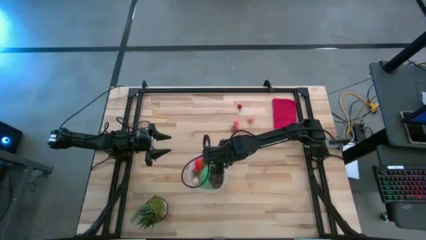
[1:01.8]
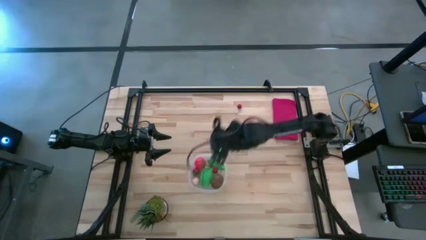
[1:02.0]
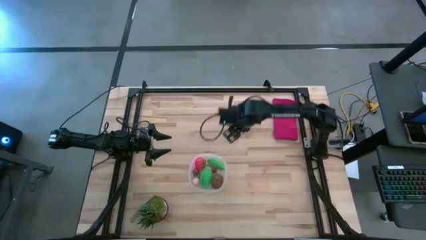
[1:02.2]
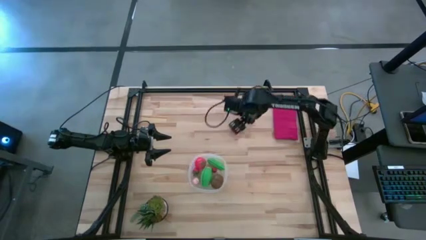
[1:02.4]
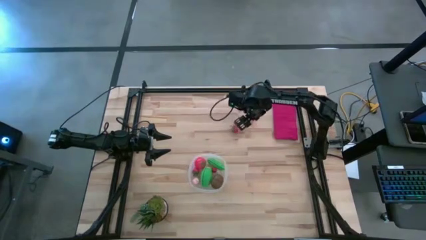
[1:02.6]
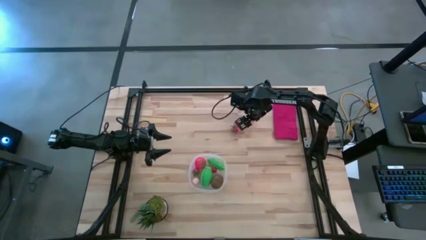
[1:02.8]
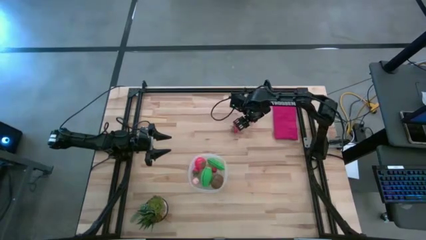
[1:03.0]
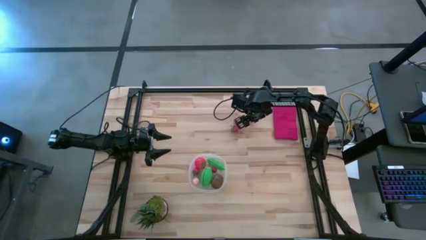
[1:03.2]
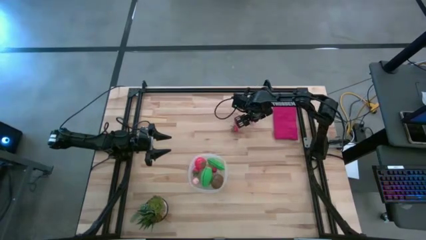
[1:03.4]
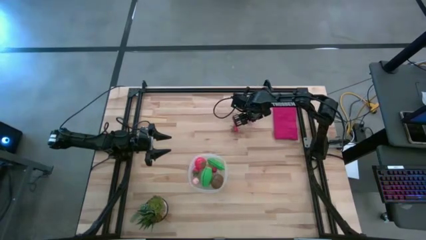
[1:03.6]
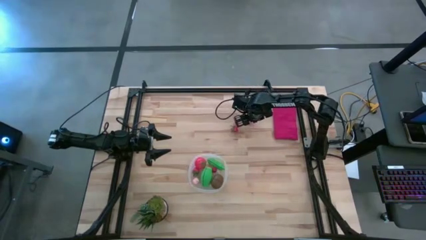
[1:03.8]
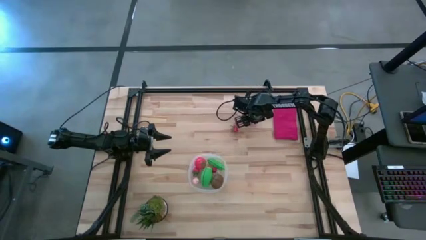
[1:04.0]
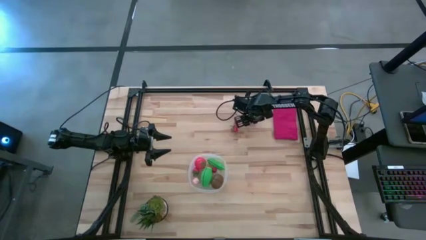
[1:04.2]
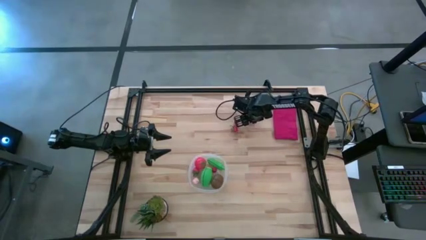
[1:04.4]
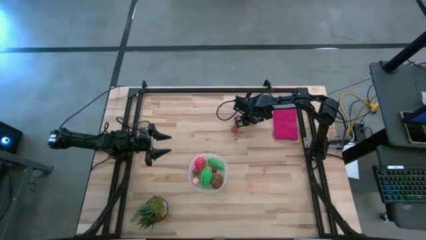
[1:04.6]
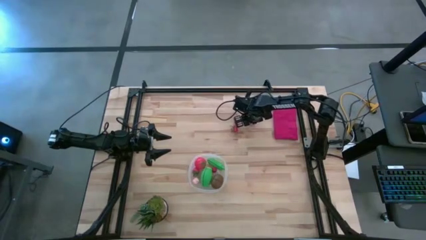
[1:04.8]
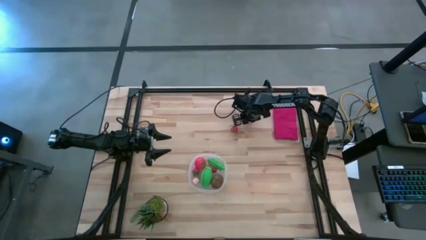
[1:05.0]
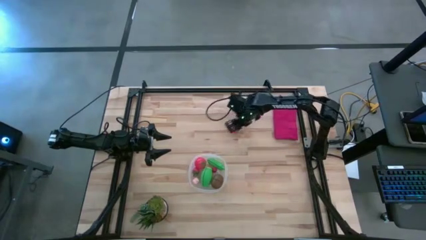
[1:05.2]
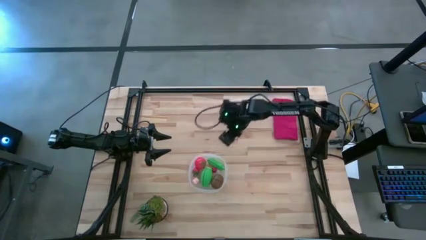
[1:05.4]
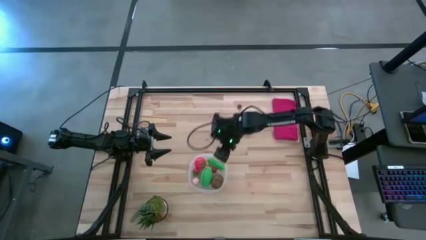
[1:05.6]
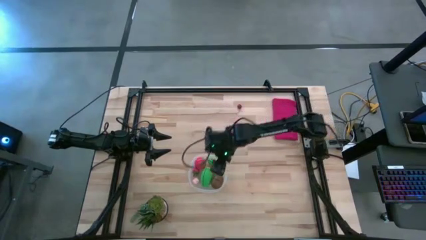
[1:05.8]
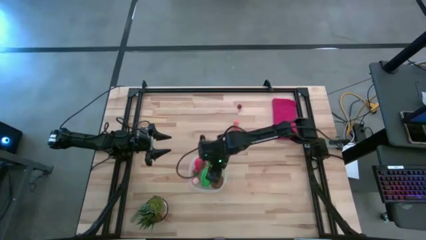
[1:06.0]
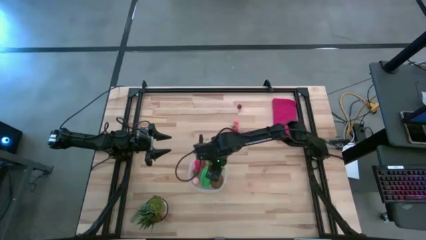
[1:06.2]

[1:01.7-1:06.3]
Task: Pick and placing Produce into tupperware
Put the peach into the bin

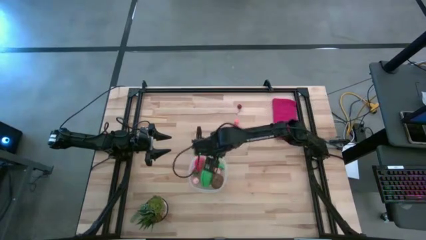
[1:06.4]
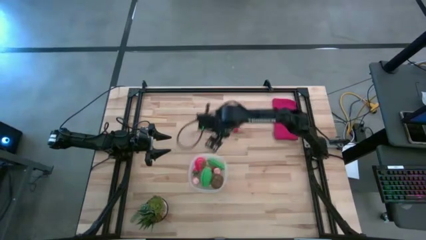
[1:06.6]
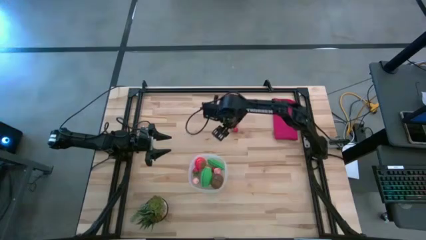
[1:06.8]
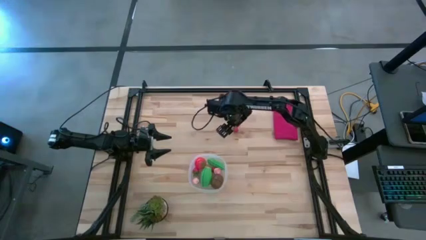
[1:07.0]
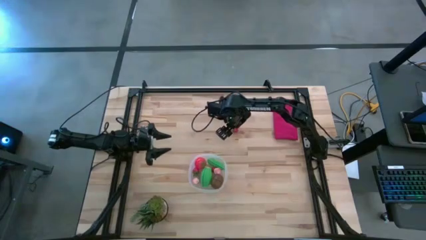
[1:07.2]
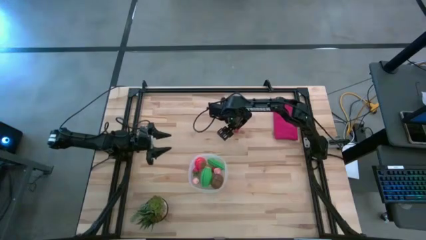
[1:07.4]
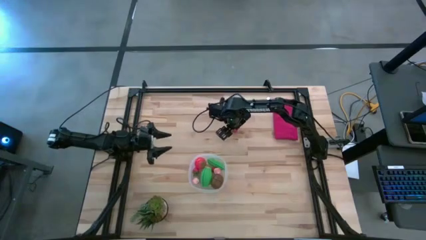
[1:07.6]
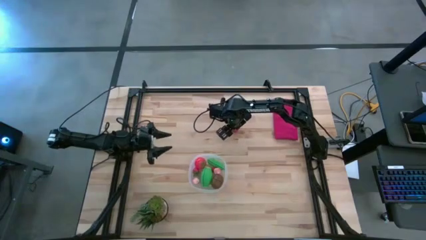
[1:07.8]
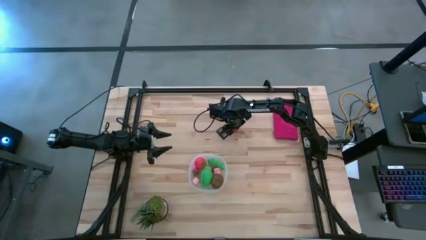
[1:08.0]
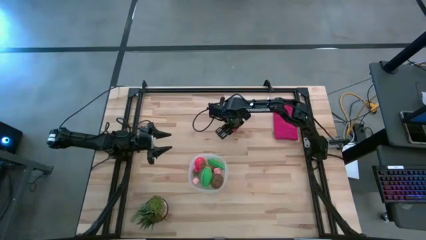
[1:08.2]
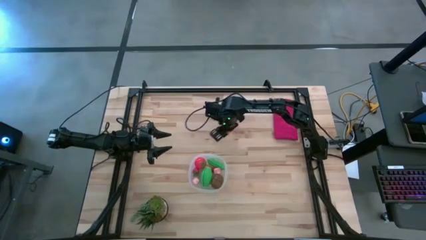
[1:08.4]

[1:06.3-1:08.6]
Put the red strawberry into the bin

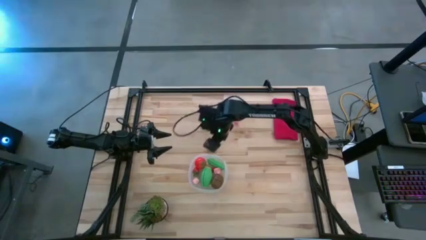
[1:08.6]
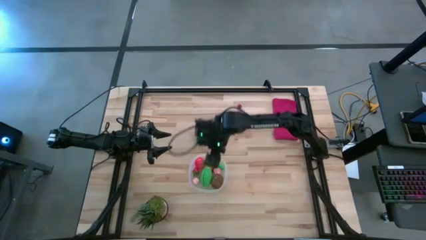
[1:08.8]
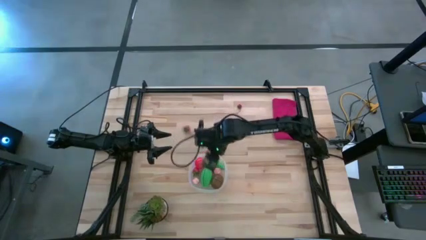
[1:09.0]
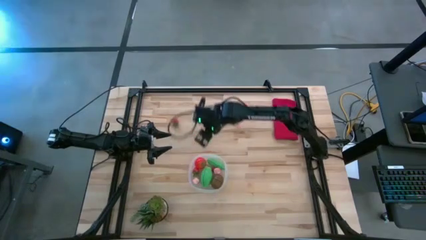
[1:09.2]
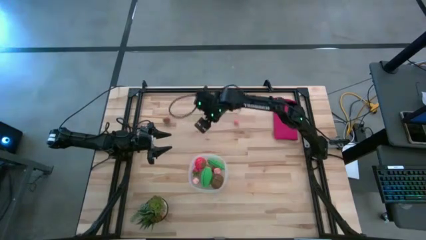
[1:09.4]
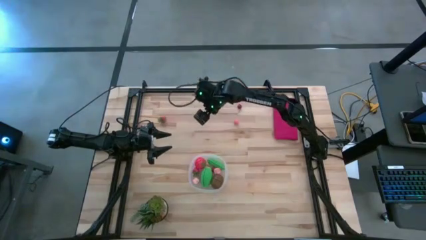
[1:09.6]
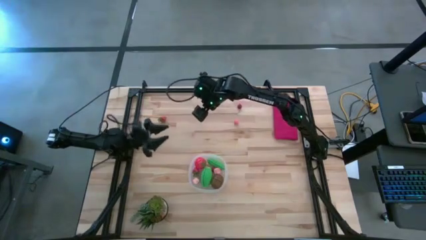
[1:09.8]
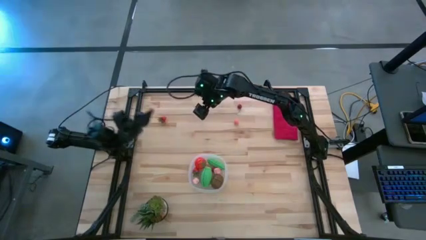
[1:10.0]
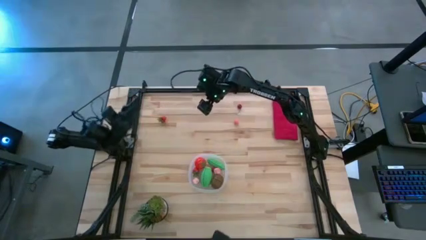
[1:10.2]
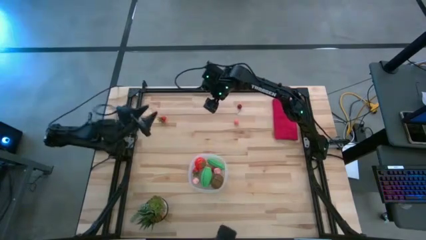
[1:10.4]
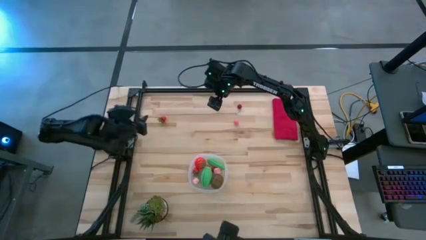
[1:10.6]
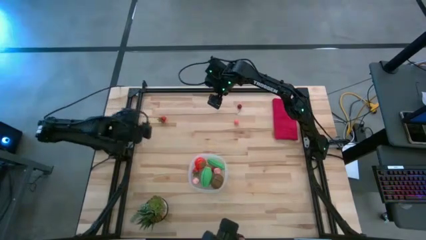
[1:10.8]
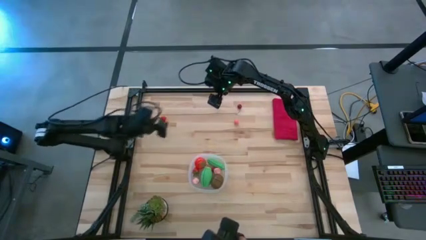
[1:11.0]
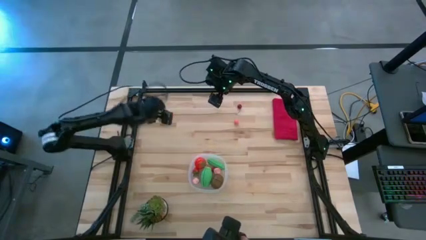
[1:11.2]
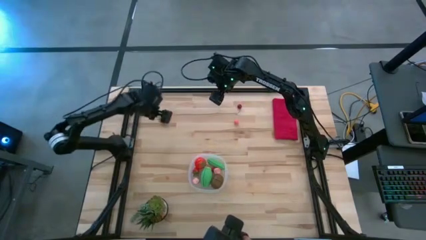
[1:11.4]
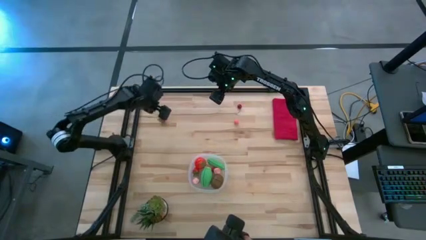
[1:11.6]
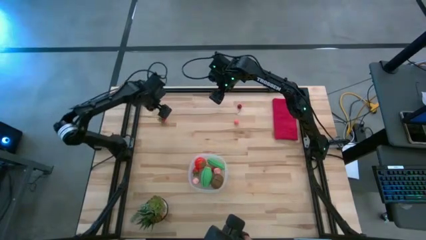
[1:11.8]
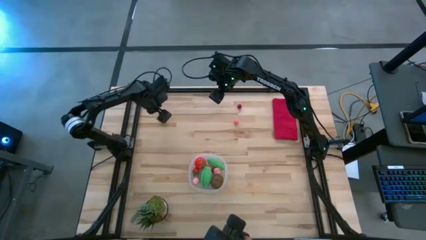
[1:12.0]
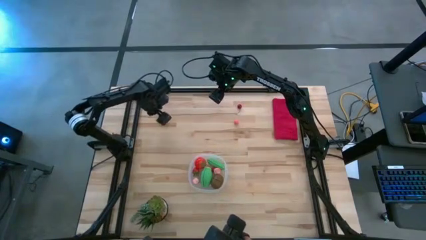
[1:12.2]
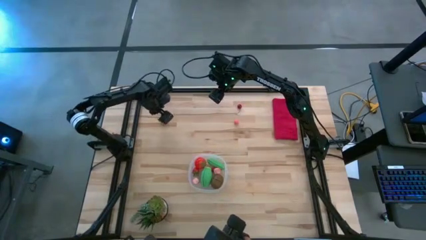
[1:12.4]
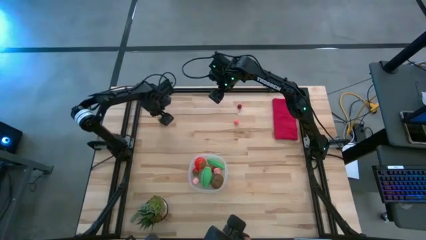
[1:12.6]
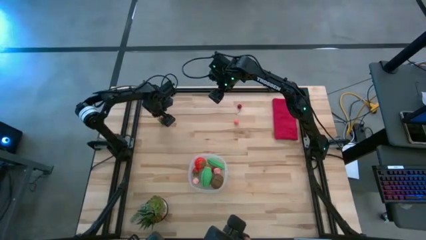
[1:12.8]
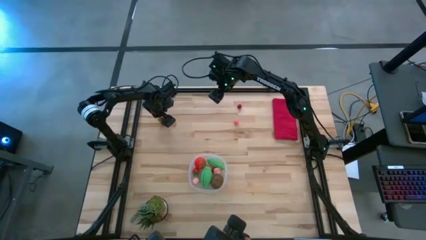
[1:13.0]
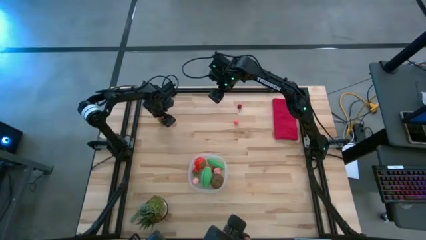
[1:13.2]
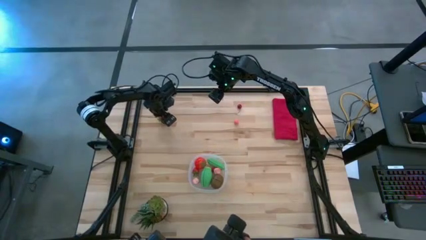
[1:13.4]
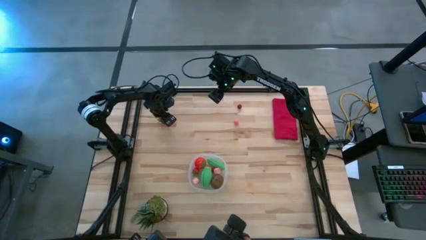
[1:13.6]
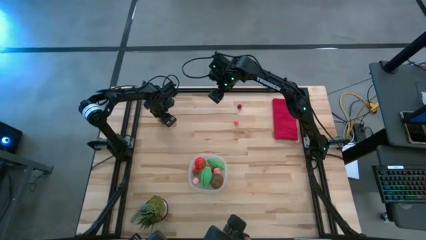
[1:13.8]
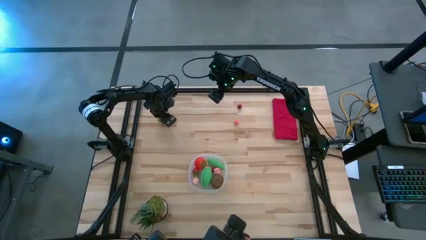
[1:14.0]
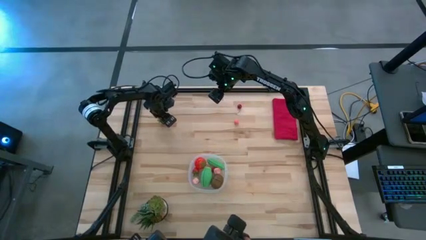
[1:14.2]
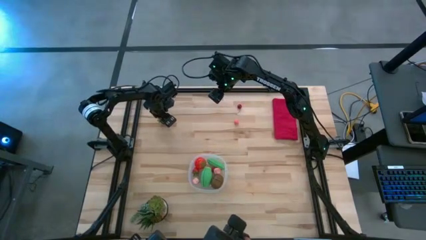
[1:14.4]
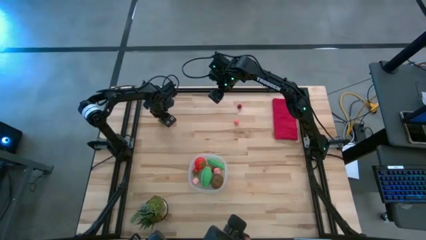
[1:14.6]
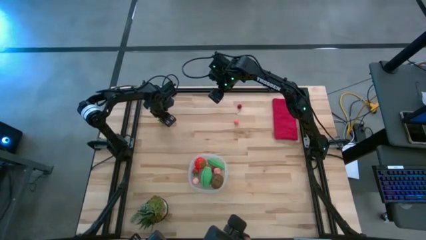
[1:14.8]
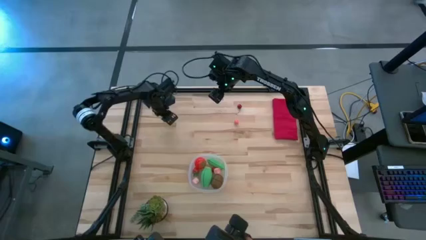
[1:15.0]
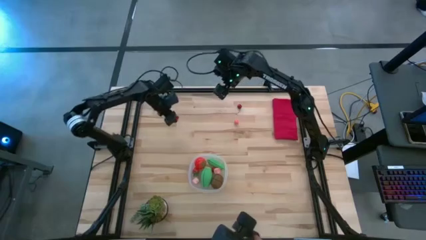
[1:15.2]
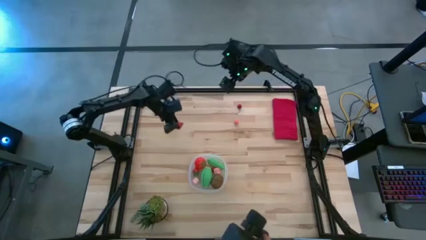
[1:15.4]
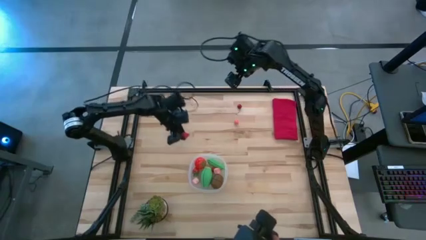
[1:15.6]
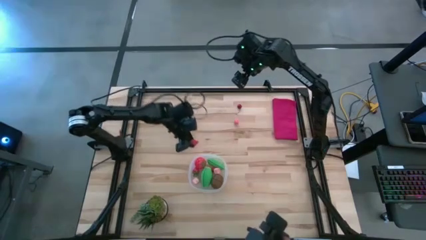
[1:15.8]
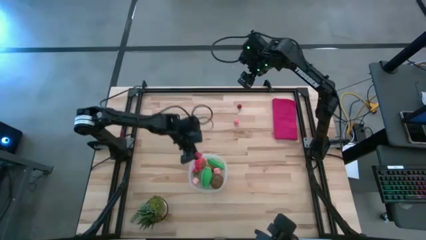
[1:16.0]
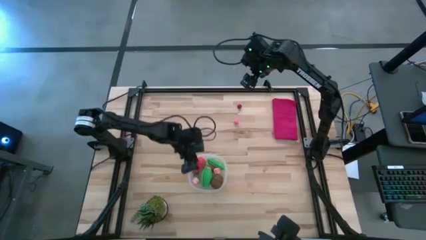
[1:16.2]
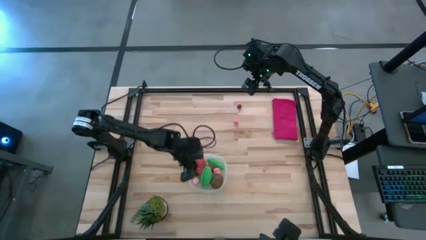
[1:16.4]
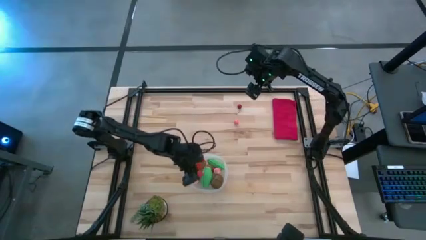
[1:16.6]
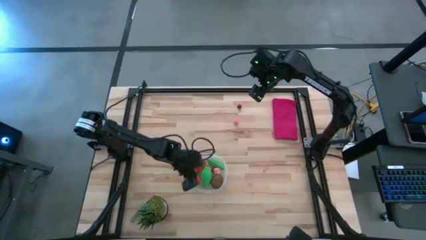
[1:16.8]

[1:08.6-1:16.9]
Put the red strawberry into the bin
